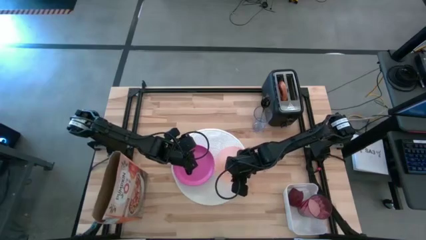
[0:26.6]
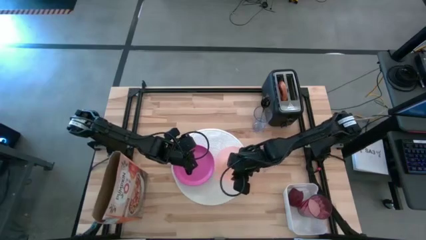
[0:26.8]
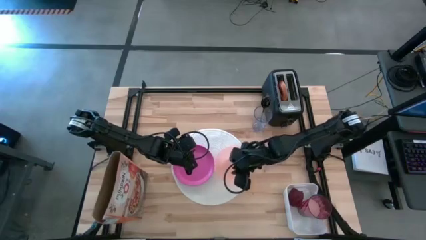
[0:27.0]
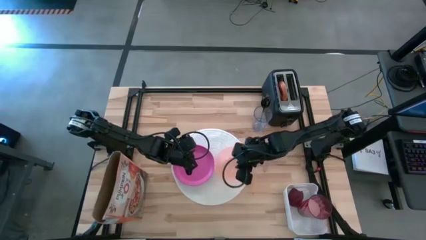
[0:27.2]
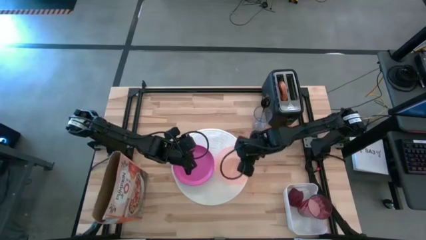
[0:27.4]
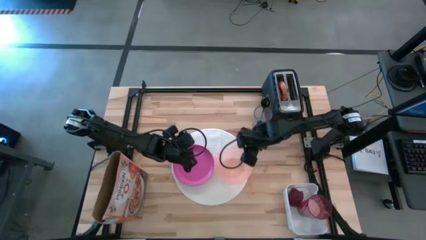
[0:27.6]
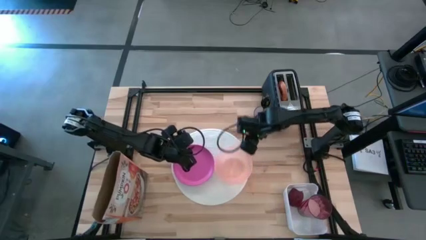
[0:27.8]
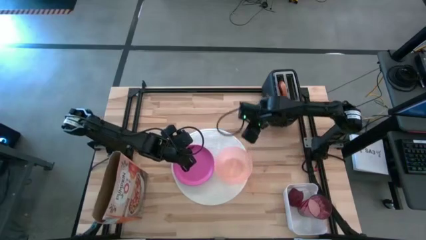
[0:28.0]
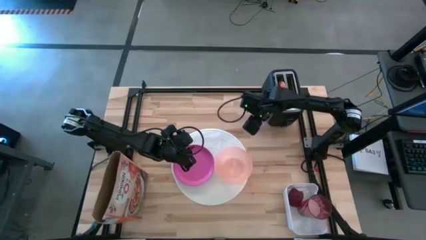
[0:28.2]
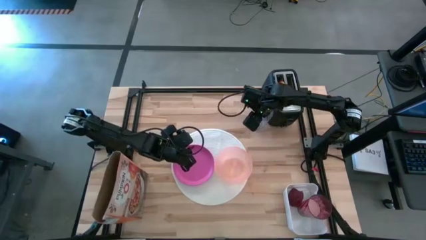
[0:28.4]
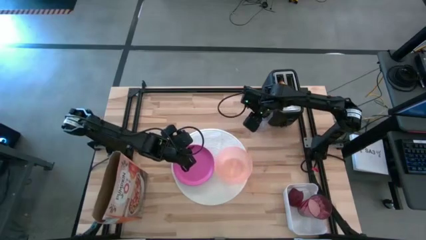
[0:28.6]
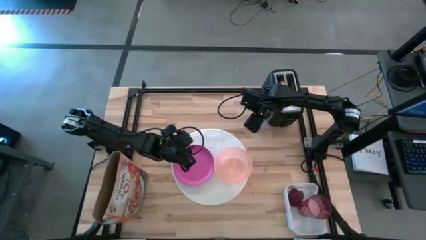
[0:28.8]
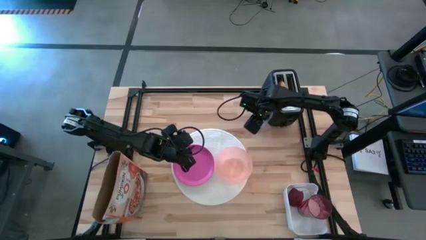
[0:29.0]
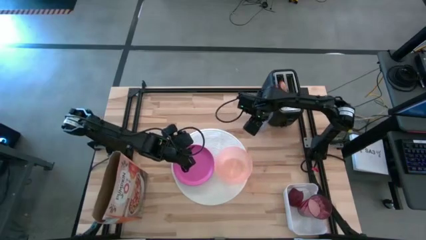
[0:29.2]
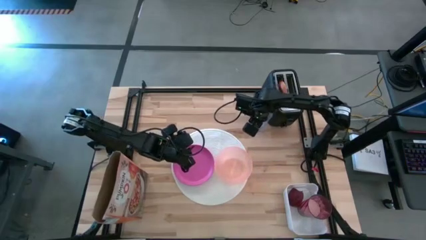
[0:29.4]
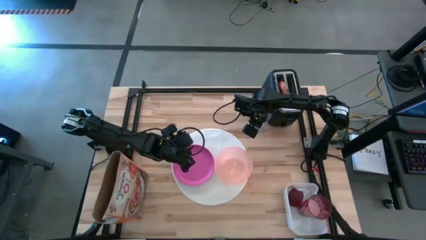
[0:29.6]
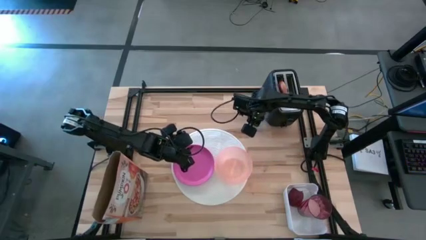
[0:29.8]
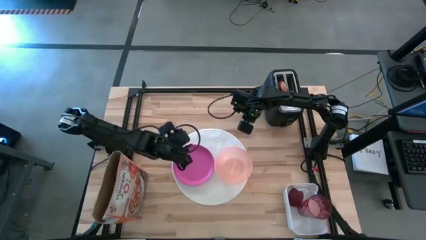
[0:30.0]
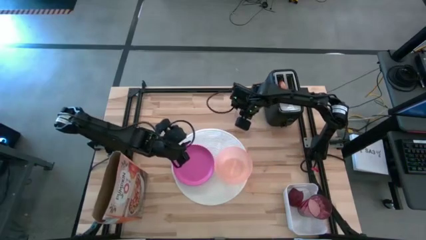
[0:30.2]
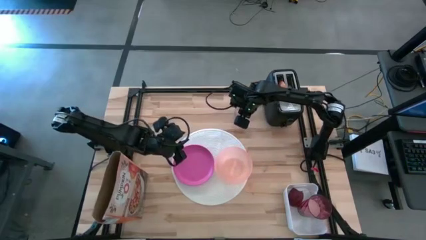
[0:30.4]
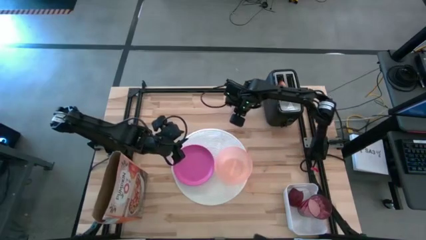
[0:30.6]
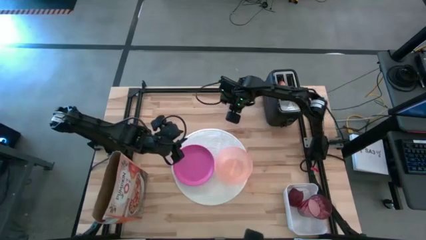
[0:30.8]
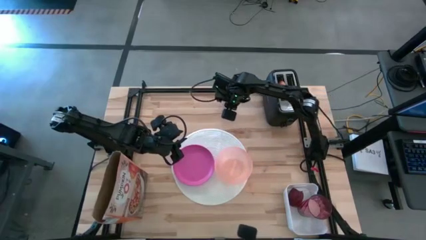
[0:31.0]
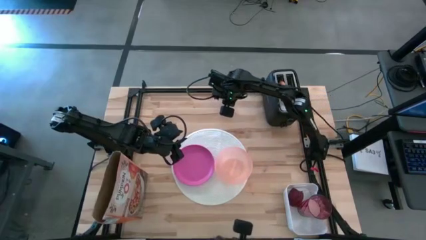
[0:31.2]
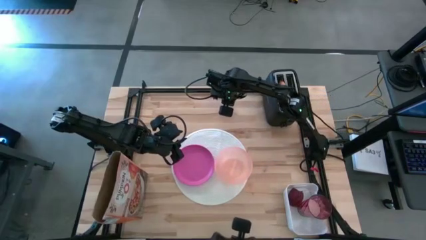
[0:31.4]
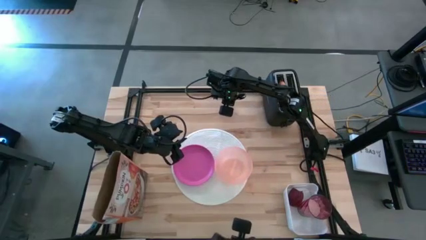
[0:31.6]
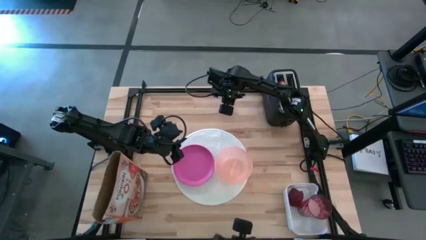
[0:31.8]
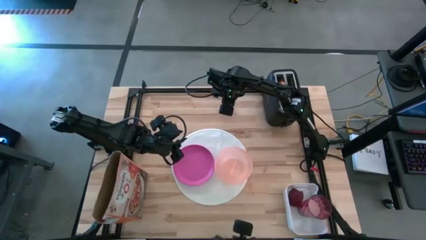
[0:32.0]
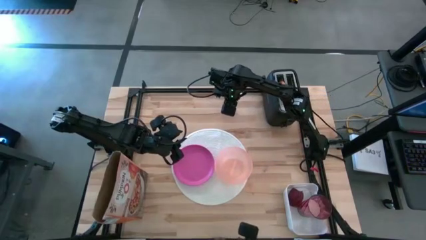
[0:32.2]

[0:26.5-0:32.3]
Task: Arrange a breakfast setting
Adjust the transparent cup

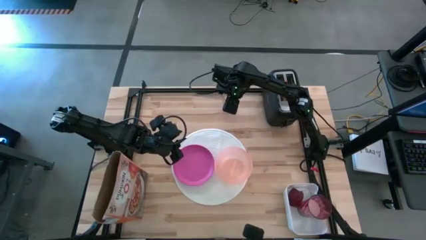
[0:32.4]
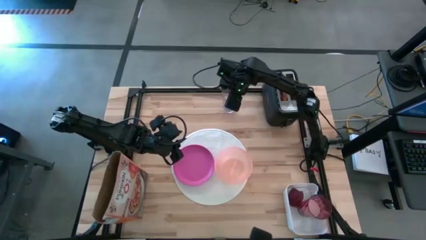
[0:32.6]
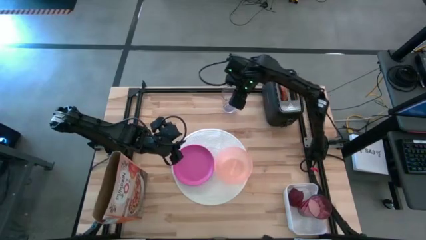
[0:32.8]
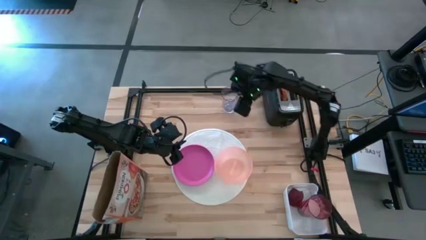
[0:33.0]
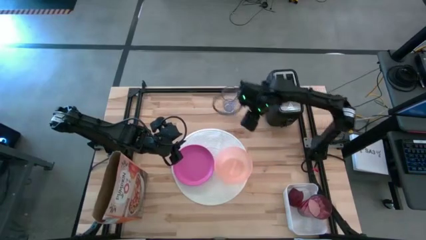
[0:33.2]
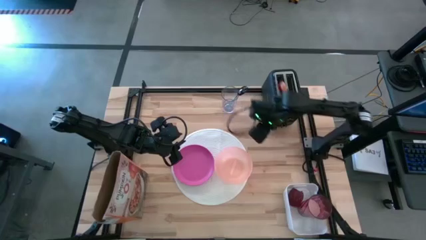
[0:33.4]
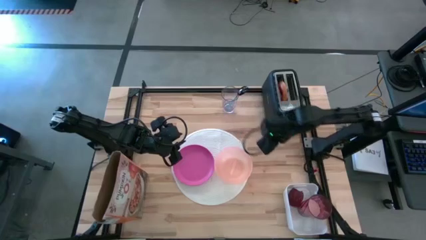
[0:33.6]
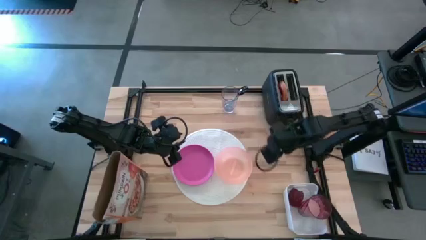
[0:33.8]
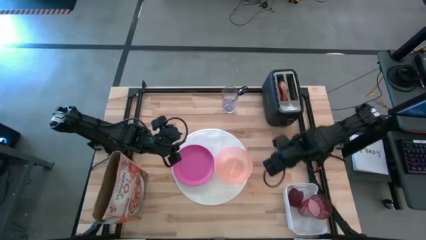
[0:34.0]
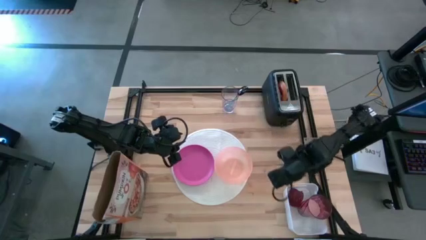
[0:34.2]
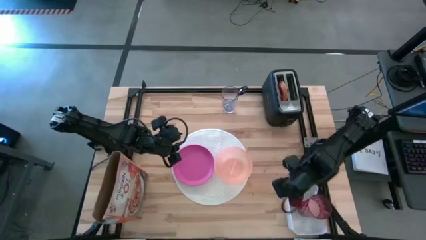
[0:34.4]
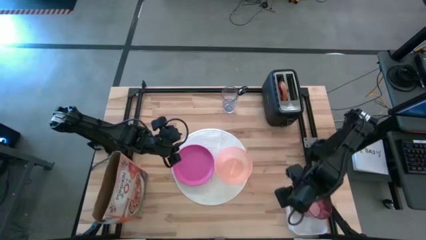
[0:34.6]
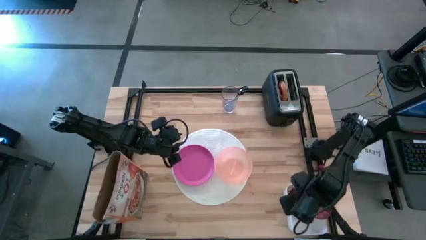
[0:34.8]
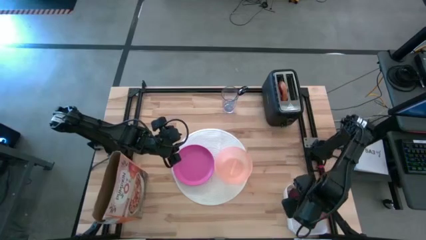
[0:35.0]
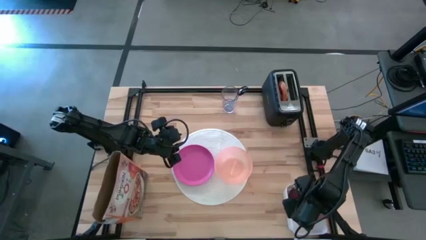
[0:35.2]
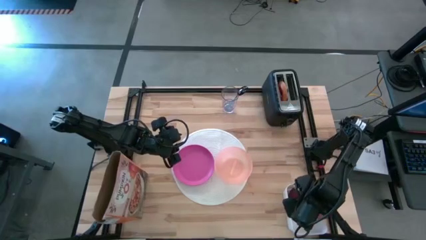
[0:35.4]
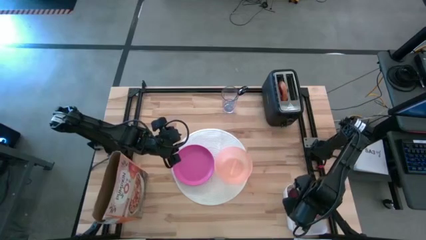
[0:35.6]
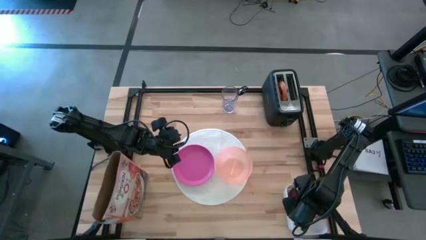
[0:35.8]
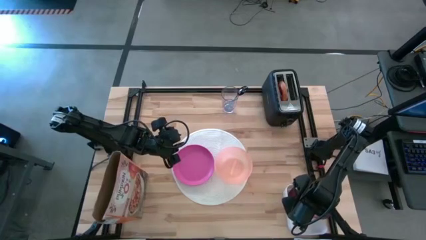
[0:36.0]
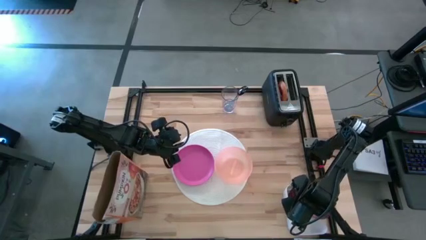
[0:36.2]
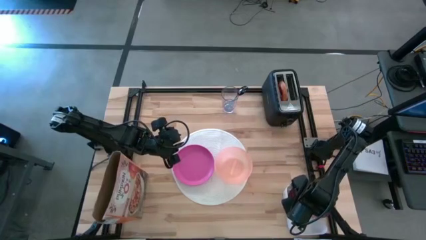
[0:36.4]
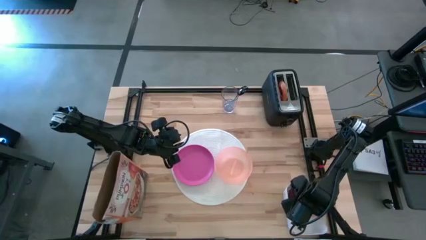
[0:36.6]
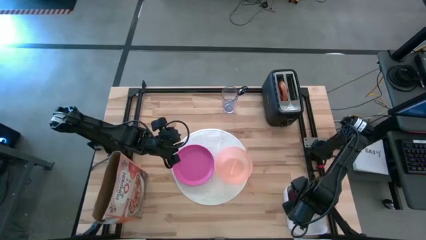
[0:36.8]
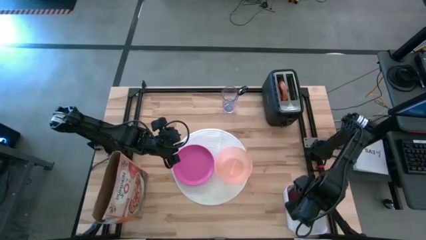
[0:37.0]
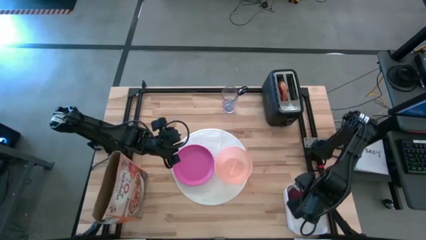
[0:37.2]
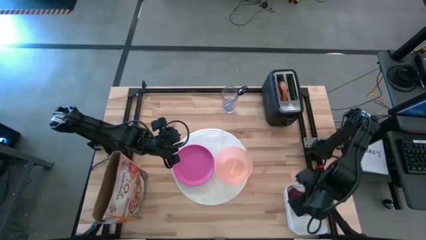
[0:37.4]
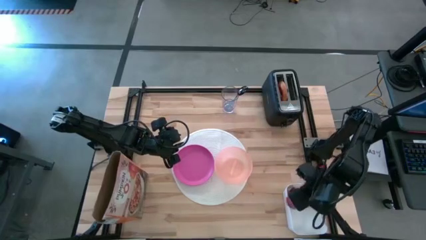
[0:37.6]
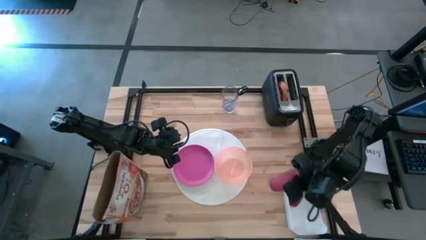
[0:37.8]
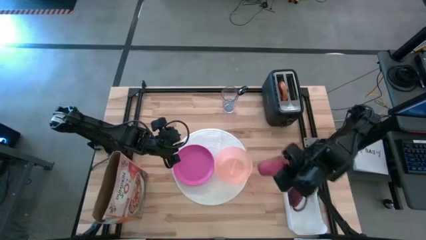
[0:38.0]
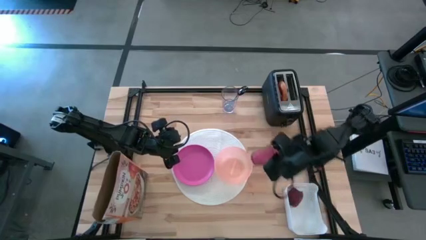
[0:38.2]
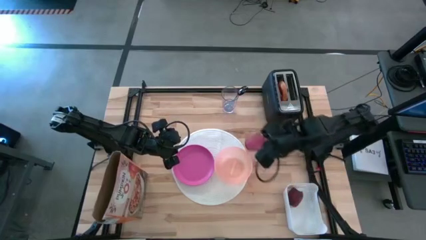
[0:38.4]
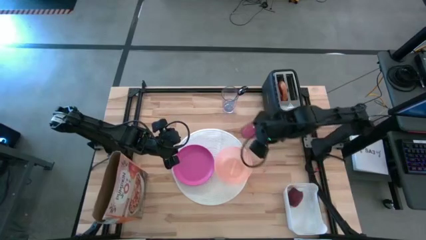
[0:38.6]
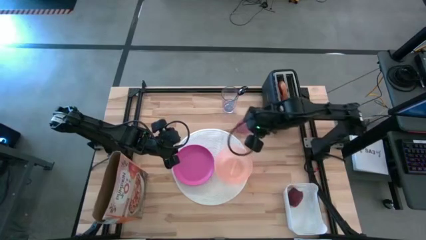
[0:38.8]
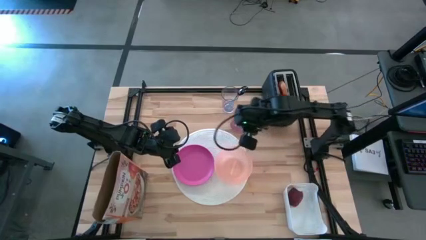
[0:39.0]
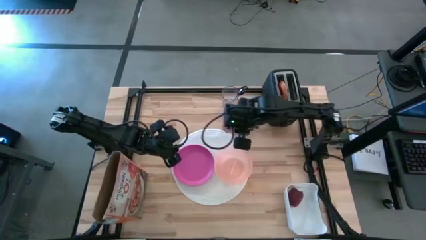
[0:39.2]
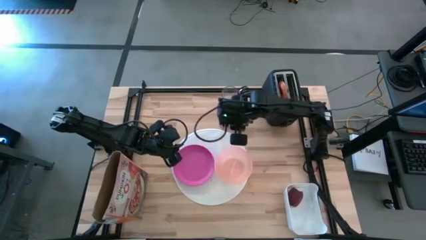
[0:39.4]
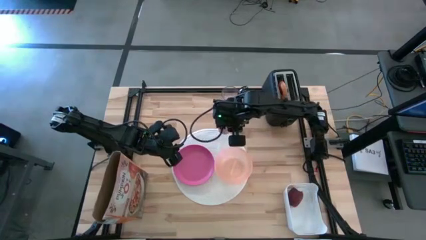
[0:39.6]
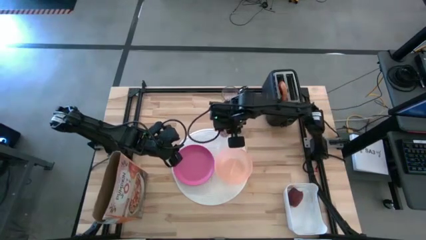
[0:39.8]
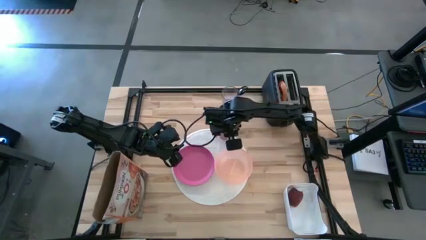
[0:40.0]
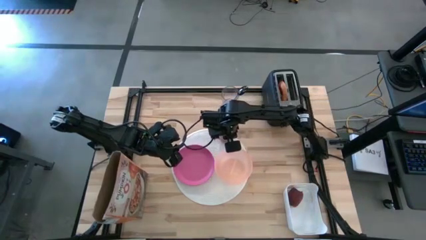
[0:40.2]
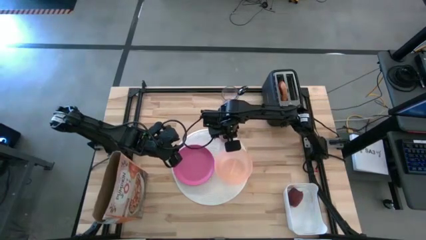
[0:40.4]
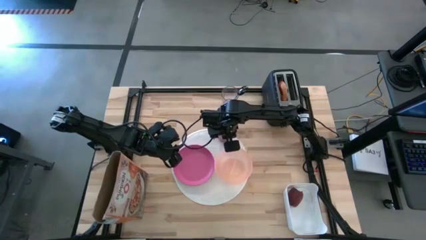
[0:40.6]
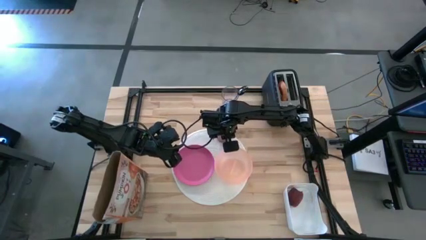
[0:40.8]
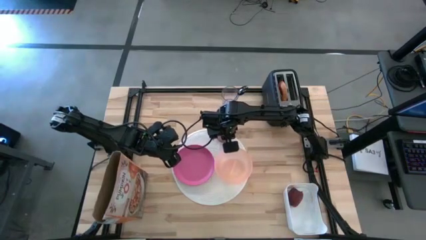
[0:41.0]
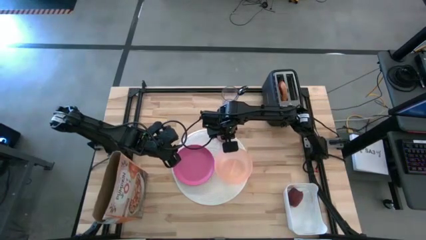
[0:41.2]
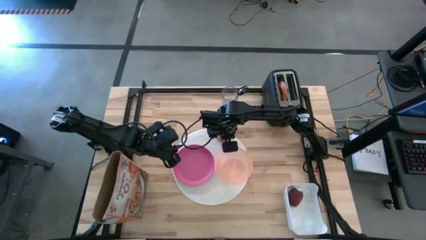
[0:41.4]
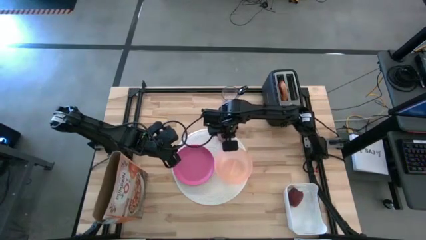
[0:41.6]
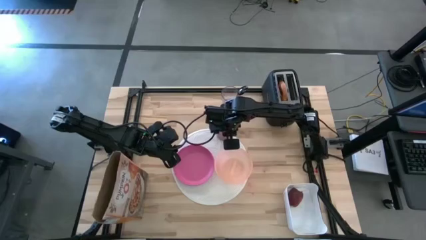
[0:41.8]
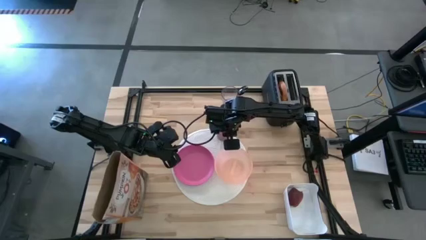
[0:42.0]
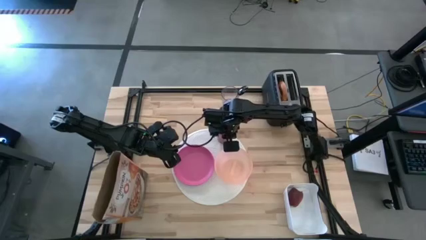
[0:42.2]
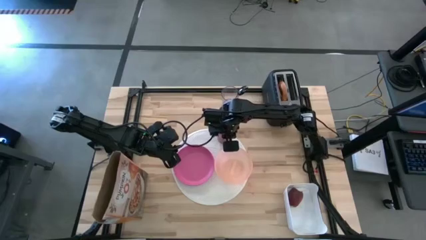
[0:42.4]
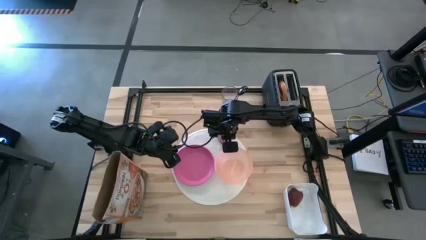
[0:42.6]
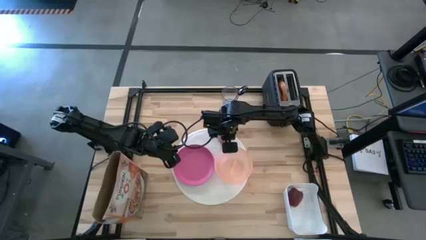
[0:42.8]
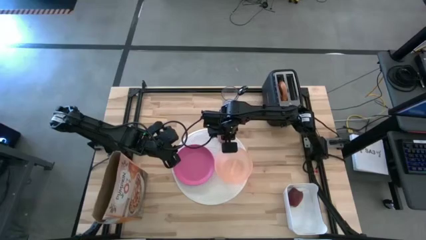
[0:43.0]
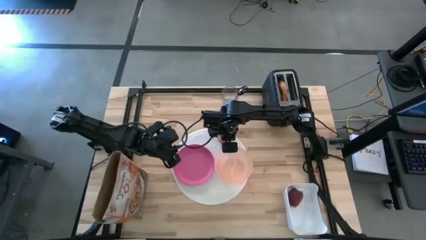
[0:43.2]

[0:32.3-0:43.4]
Put the red cup of milk to the top of the orange bowl on the white mat
